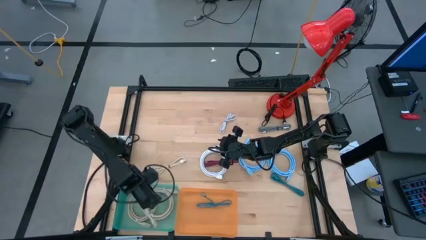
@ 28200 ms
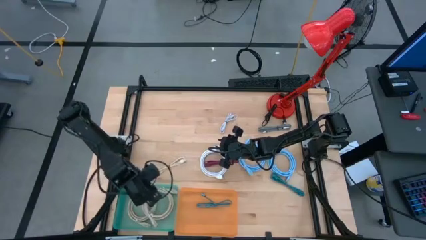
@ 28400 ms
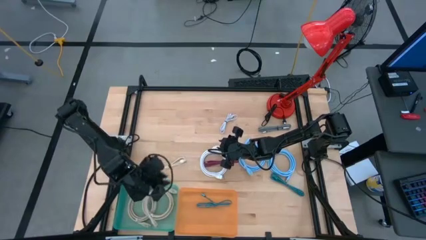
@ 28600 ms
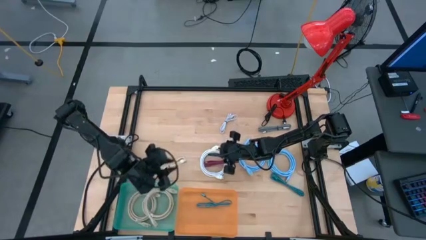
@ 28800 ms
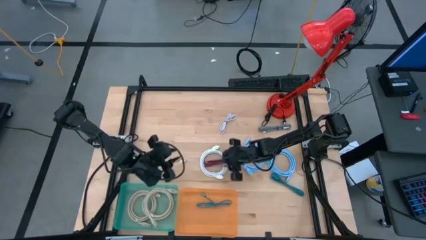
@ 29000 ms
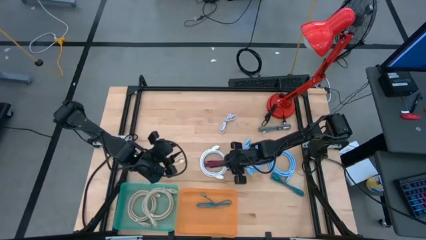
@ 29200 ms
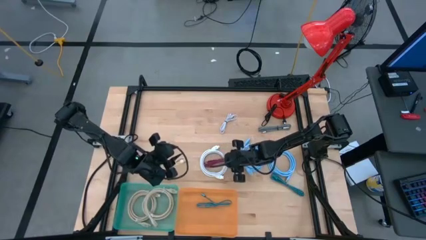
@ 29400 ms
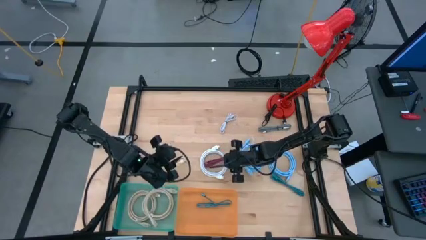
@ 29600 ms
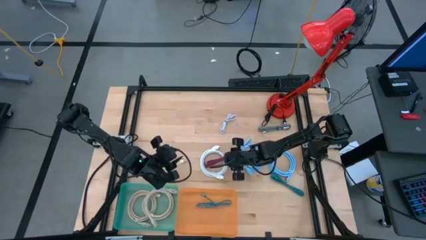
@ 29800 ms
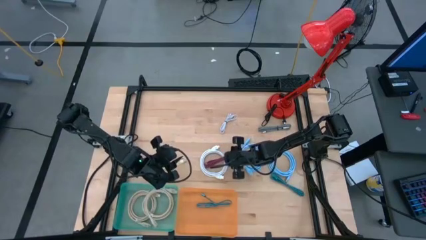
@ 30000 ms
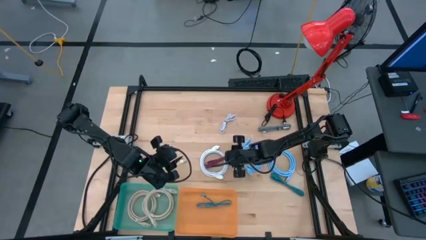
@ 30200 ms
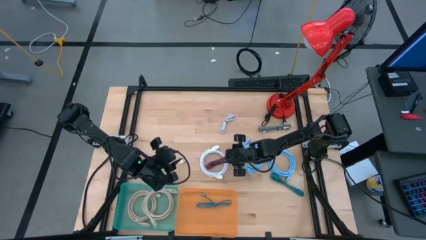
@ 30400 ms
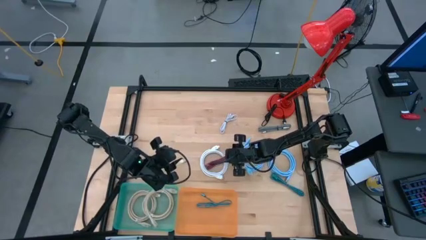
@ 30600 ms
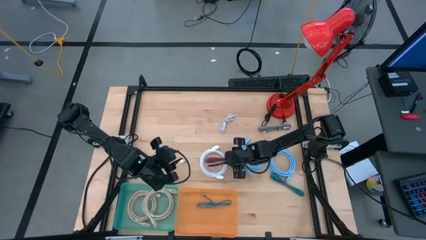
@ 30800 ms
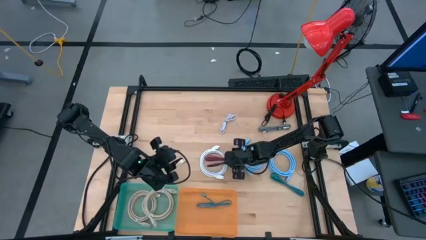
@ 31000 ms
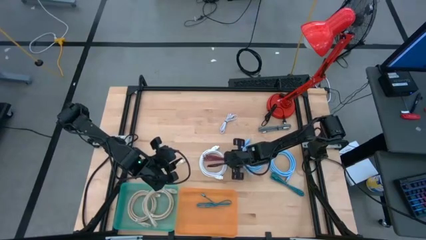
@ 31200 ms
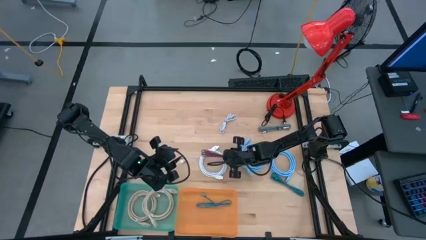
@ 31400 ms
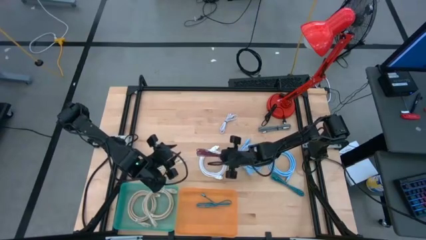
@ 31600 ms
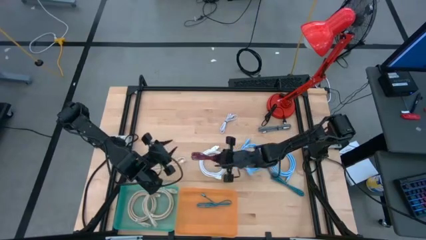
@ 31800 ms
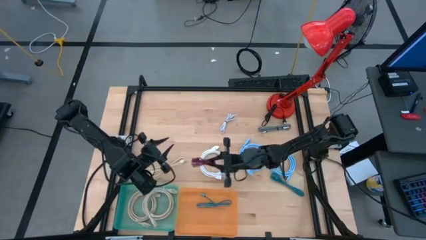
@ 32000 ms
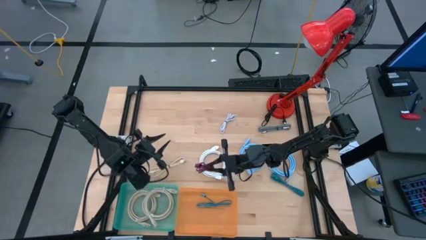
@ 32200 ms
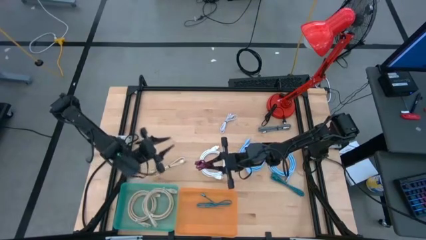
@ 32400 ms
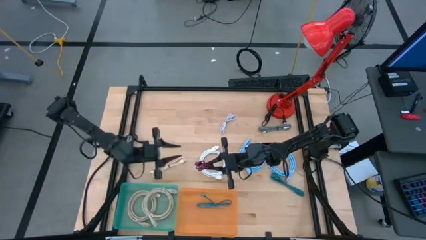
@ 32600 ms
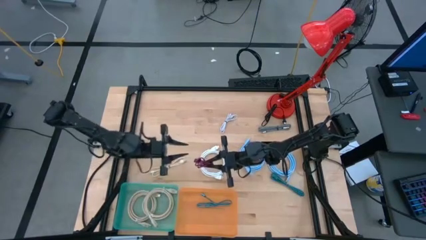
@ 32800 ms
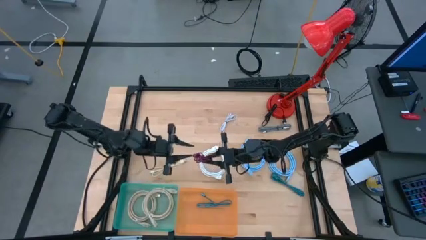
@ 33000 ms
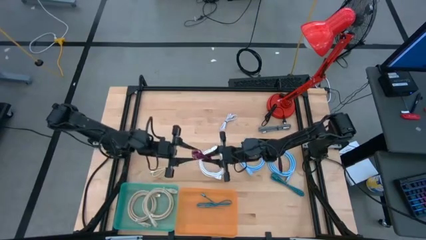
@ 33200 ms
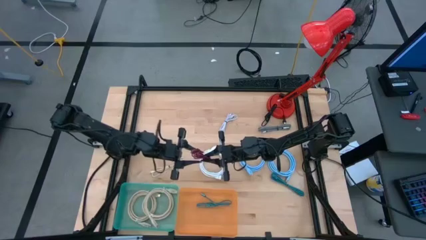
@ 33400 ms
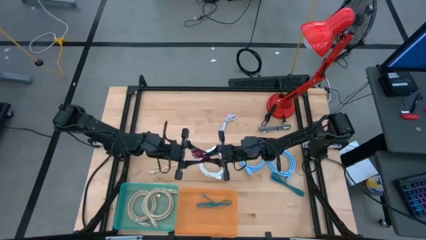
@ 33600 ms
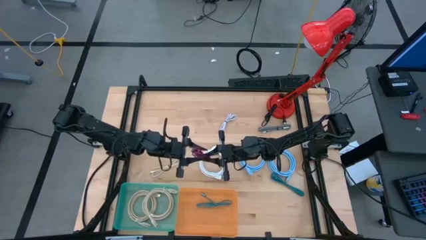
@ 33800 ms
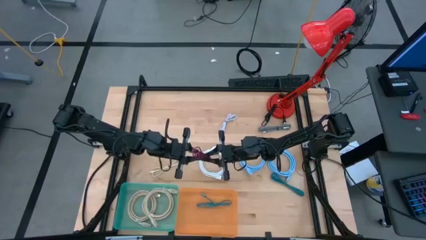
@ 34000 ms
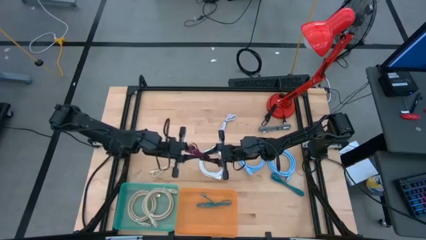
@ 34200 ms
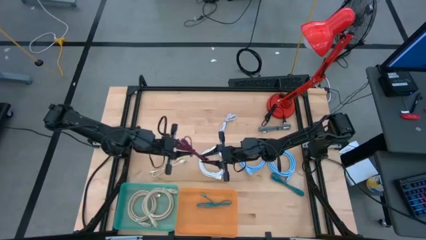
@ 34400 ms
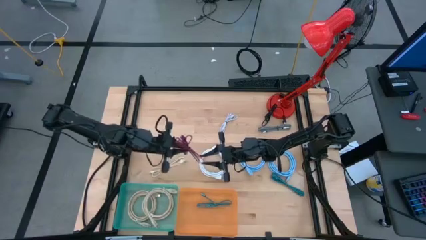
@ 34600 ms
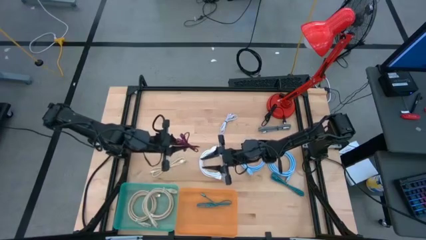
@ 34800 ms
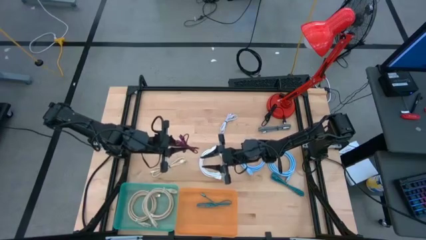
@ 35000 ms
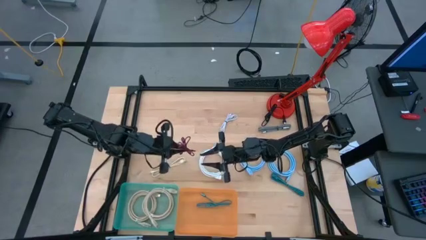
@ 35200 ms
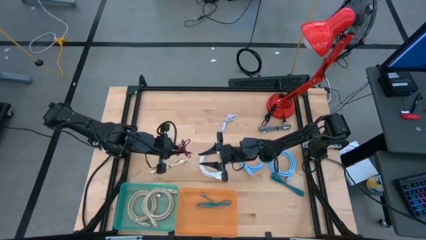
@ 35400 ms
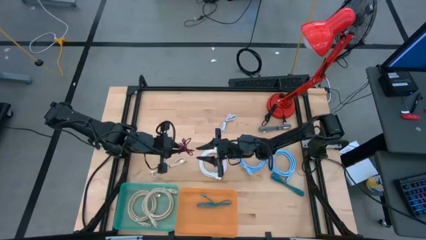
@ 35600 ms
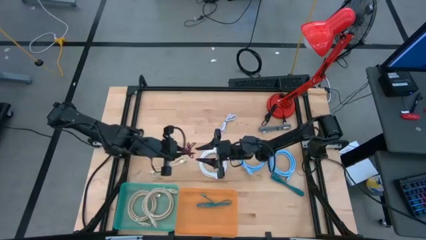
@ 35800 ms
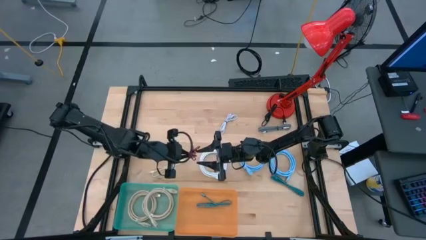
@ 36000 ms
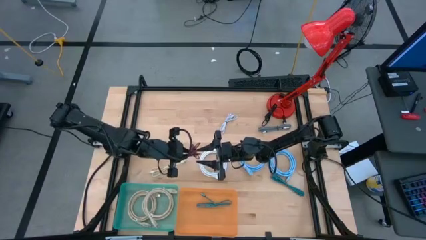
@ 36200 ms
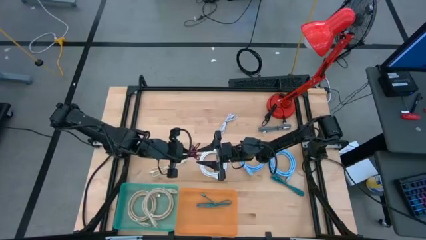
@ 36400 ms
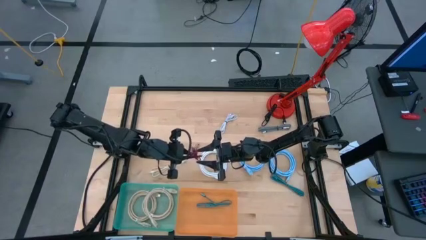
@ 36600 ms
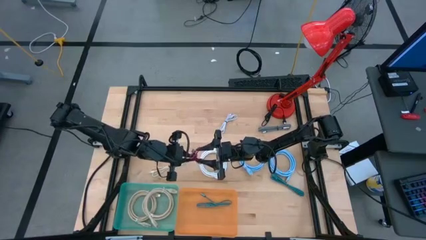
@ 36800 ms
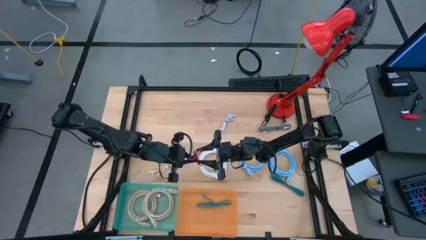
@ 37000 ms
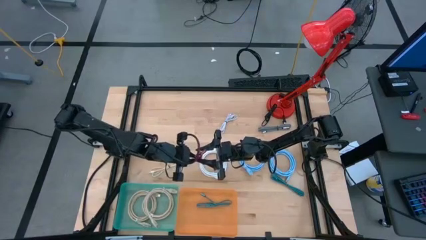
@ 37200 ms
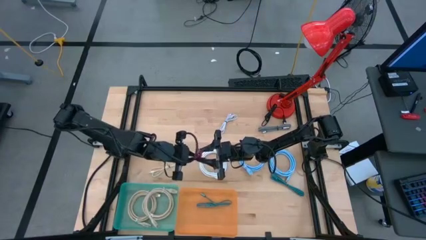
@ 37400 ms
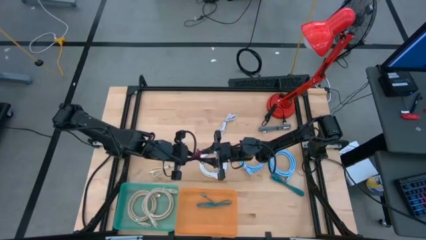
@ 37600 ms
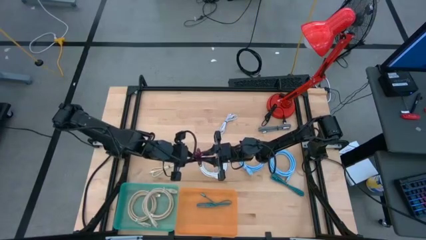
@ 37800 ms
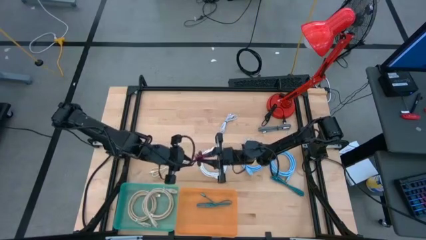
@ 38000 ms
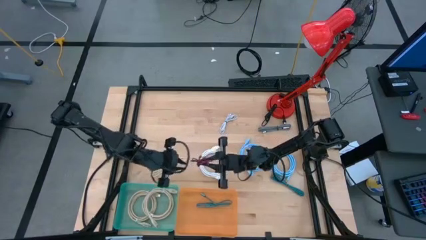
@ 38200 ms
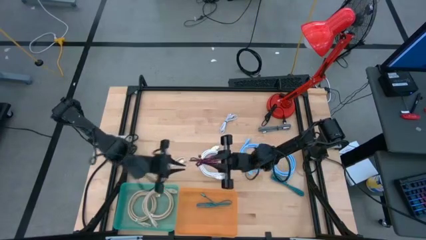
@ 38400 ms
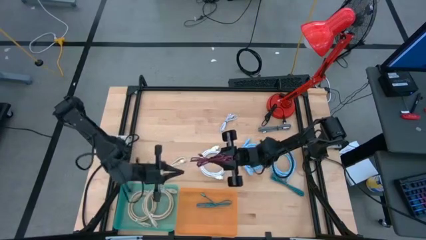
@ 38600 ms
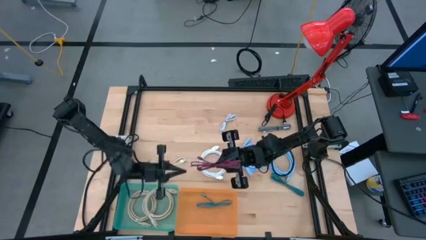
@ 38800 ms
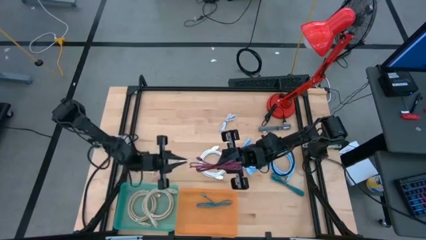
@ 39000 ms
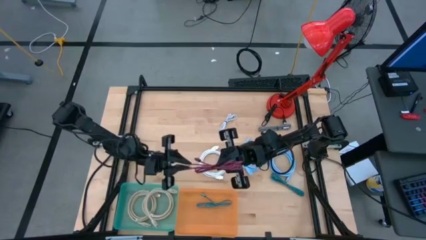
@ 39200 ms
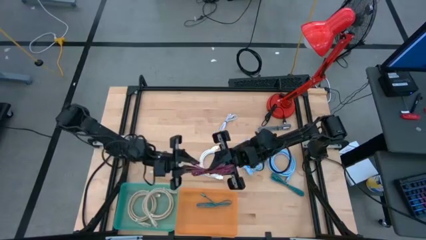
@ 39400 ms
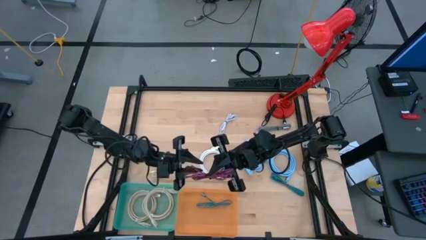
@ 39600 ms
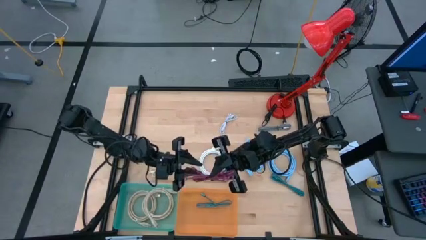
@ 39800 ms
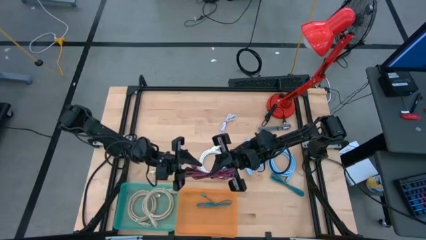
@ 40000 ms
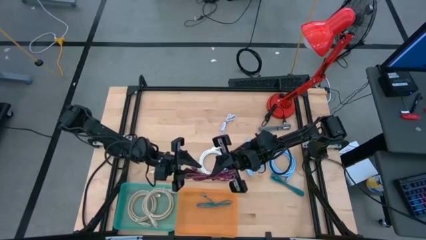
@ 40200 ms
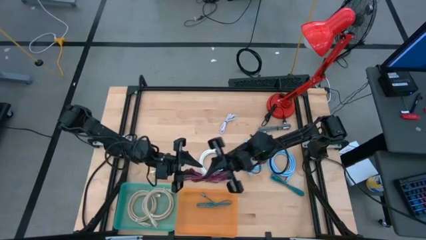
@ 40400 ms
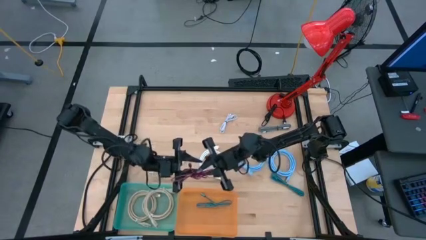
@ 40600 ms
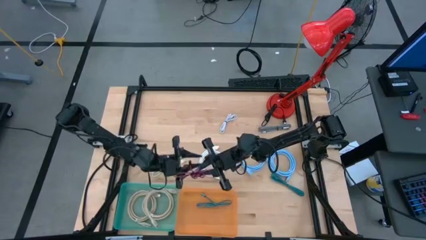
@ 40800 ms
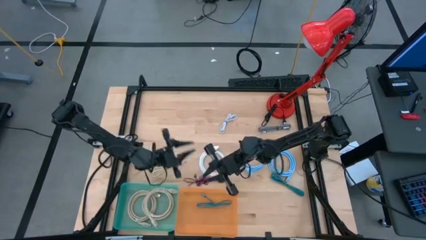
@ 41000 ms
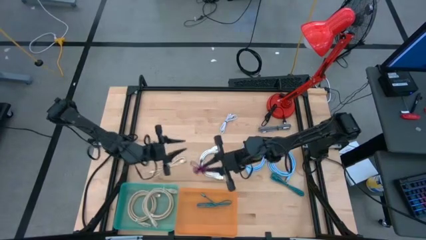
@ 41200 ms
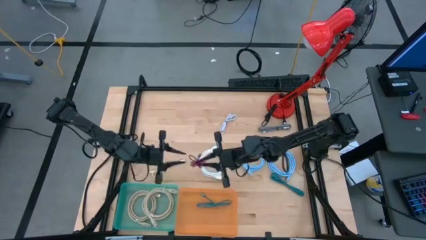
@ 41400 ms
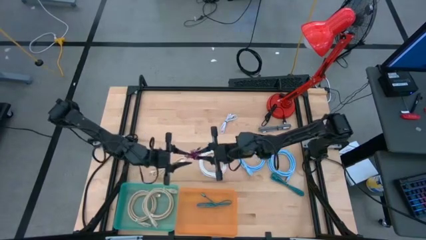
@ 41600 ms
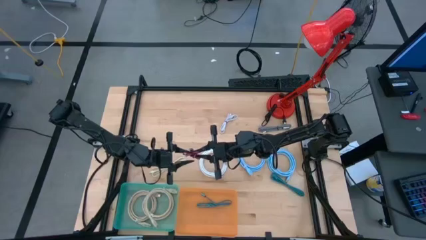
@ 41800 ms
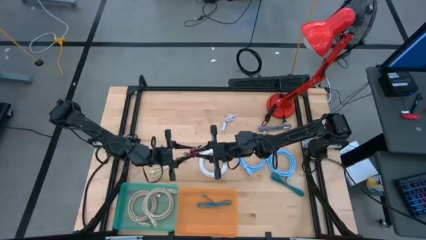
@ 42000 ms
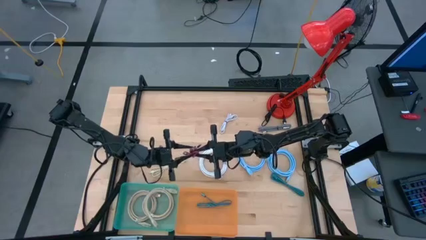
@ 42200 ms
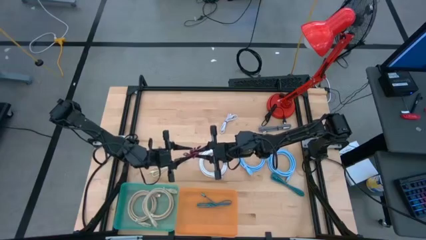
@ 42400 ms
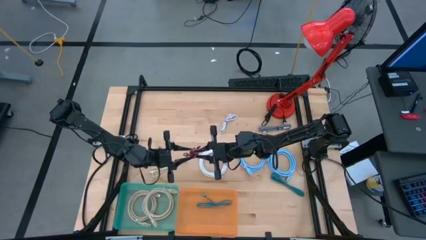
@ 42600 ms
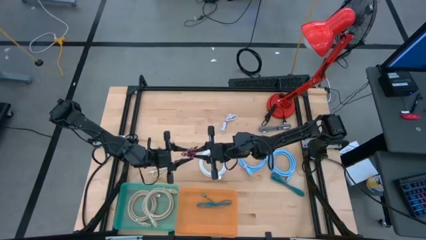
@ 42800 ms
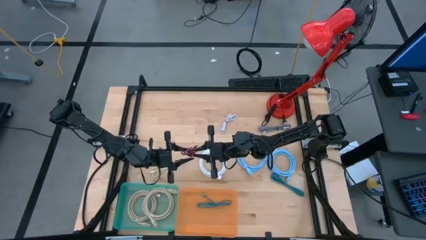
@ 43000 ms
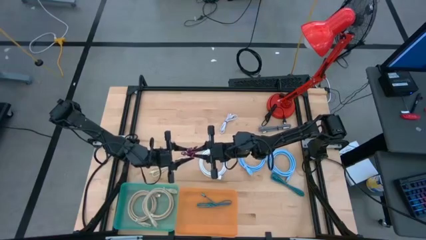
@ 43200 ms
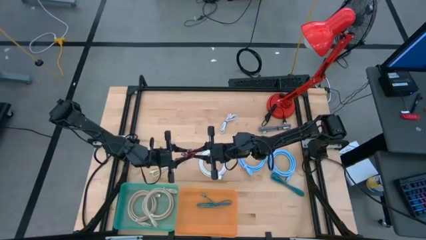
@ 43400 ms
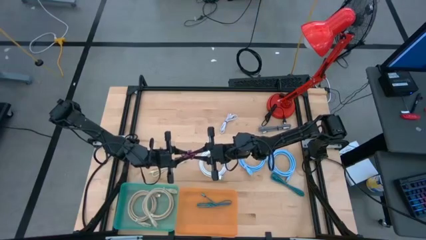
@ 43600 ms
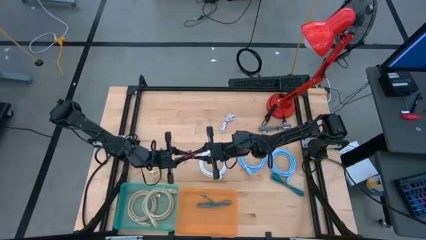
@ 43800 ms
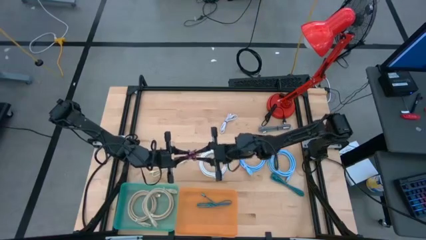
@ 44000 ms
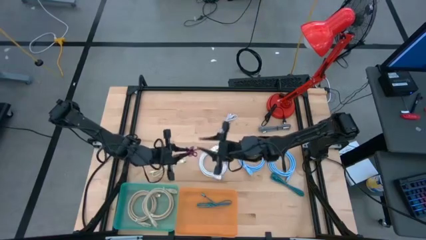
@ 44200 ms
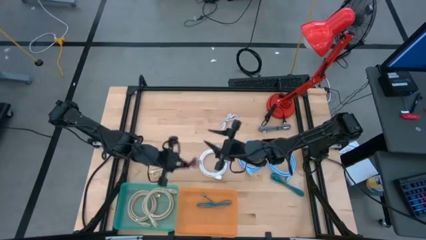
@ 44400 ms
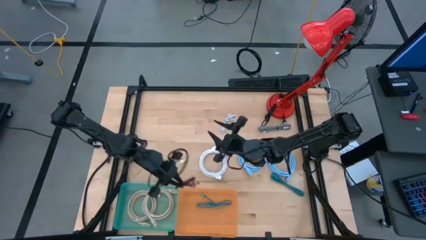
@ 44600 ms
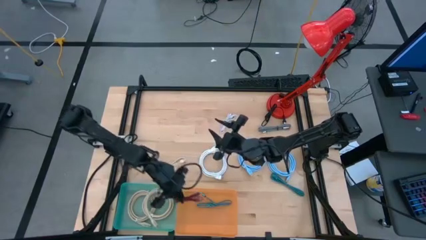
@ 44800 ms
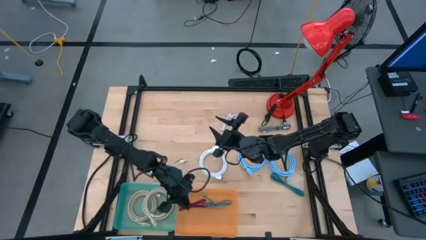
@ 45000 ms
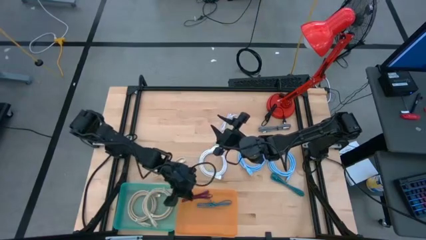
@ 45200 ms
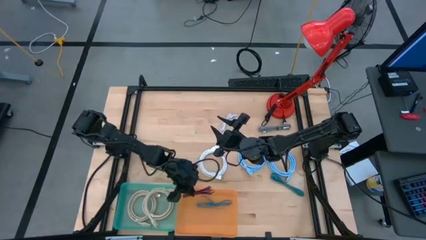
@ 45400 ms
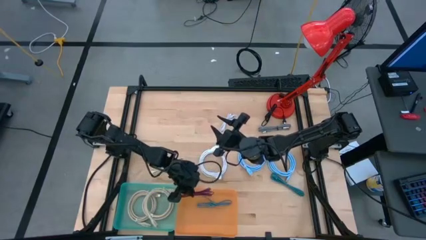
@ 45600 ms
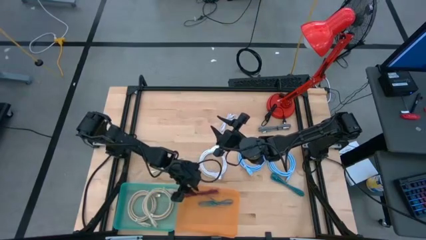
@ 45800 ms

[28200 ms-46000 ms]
Task: Pick & Place USB Port
Put the red charger cable into the orange bin
